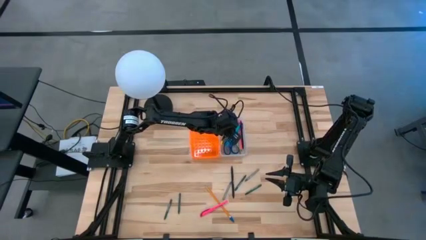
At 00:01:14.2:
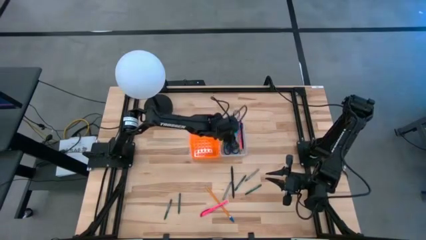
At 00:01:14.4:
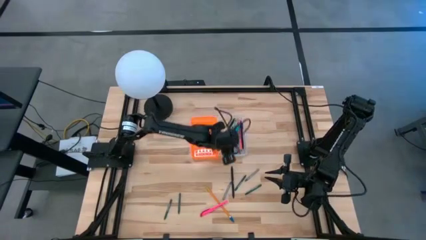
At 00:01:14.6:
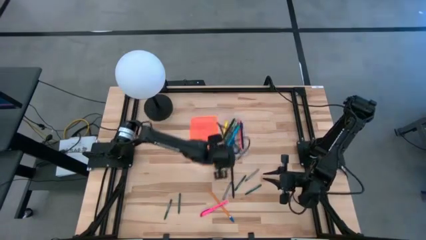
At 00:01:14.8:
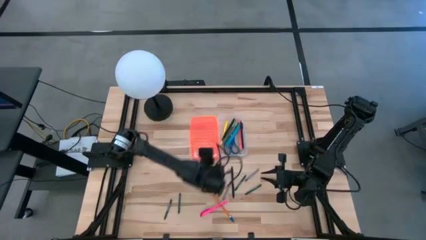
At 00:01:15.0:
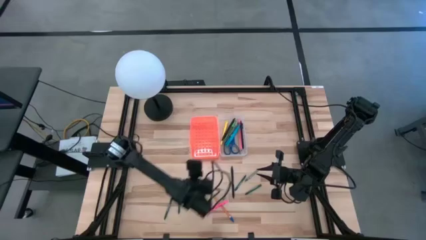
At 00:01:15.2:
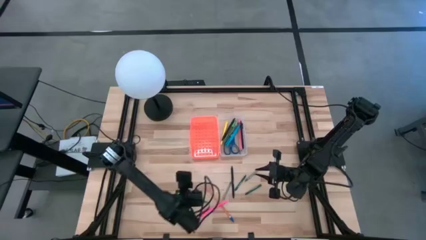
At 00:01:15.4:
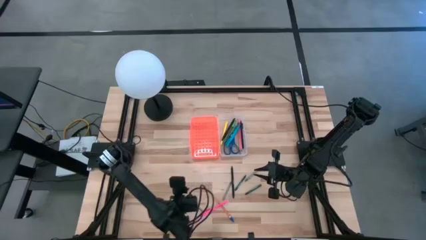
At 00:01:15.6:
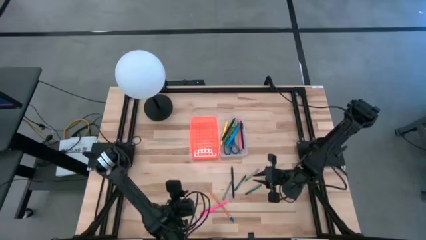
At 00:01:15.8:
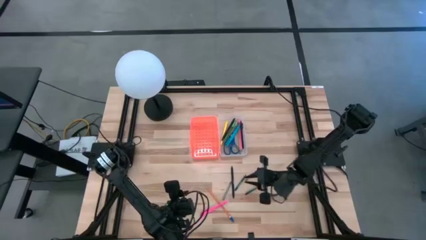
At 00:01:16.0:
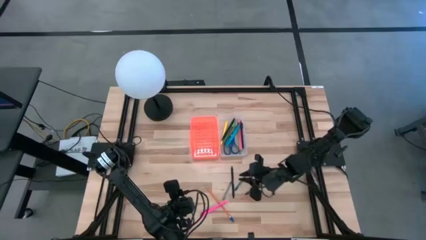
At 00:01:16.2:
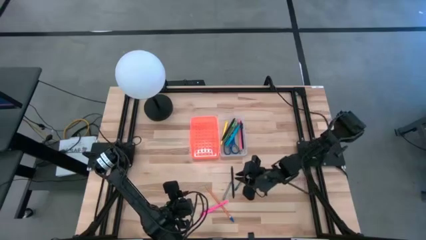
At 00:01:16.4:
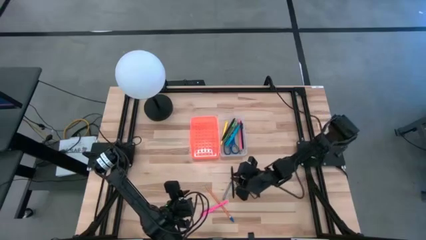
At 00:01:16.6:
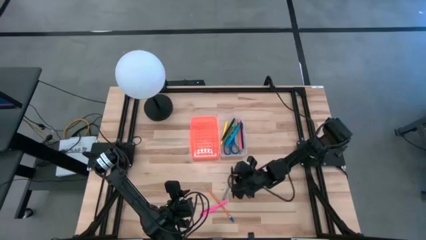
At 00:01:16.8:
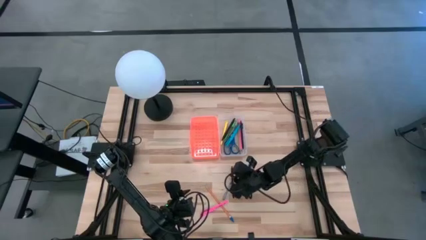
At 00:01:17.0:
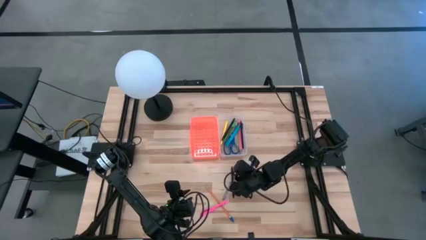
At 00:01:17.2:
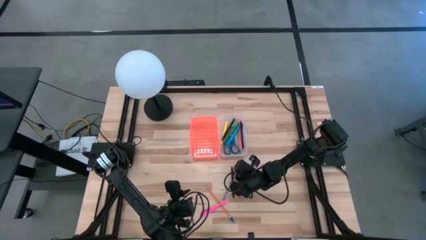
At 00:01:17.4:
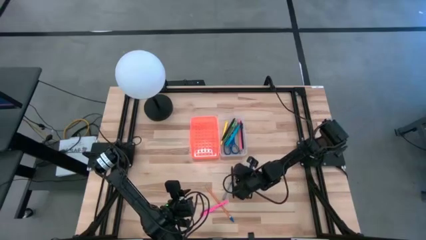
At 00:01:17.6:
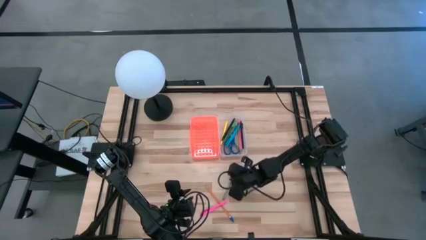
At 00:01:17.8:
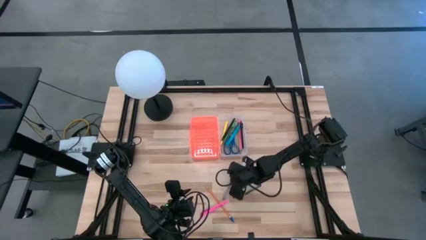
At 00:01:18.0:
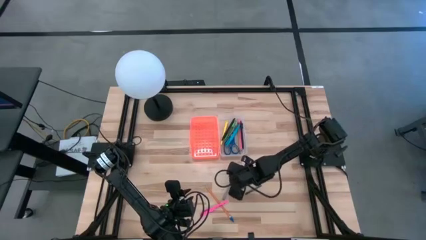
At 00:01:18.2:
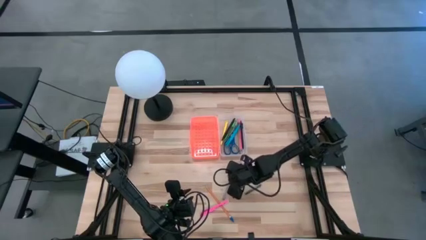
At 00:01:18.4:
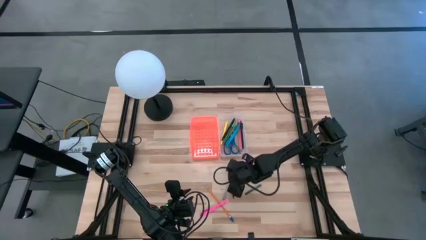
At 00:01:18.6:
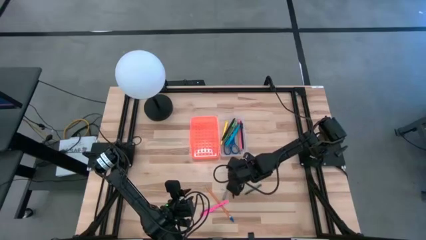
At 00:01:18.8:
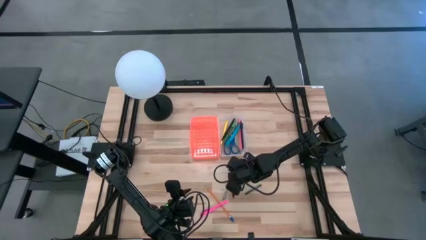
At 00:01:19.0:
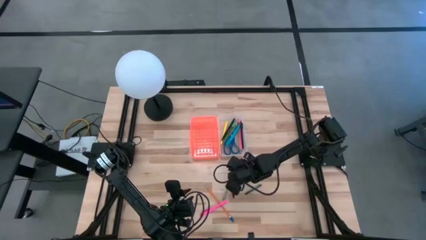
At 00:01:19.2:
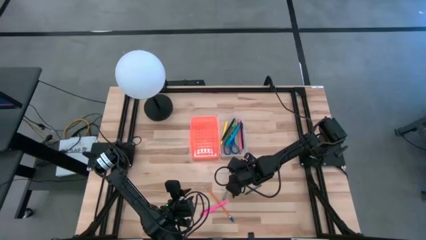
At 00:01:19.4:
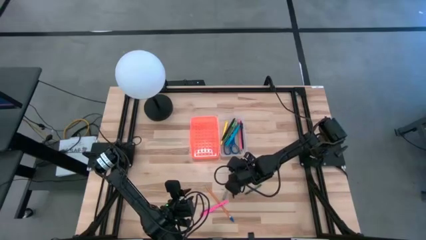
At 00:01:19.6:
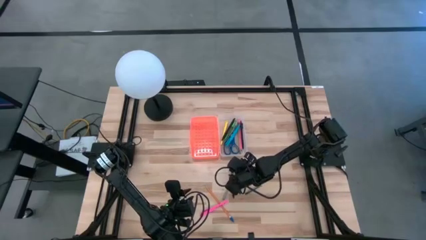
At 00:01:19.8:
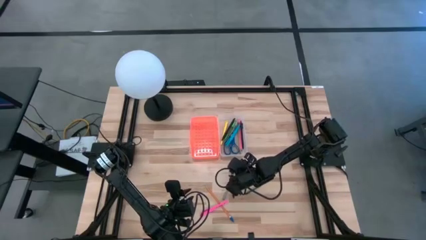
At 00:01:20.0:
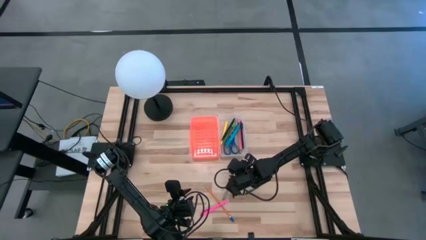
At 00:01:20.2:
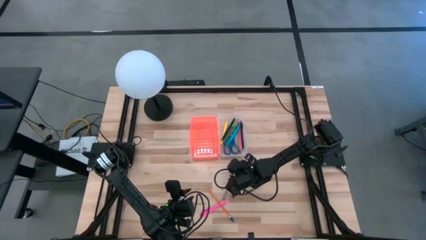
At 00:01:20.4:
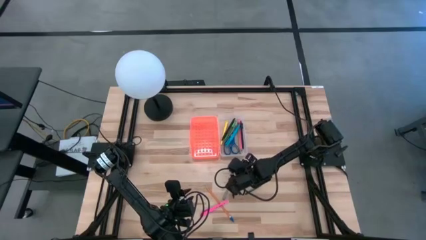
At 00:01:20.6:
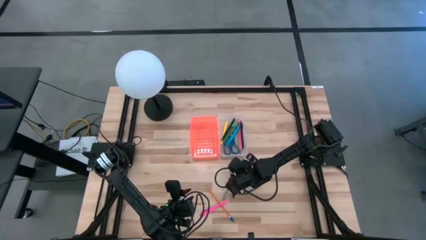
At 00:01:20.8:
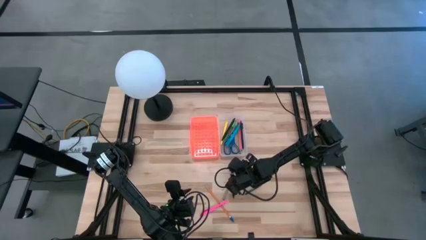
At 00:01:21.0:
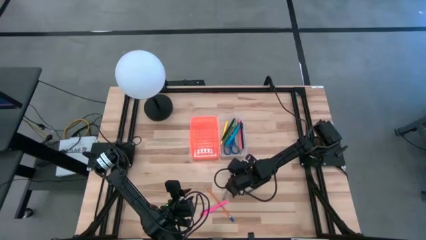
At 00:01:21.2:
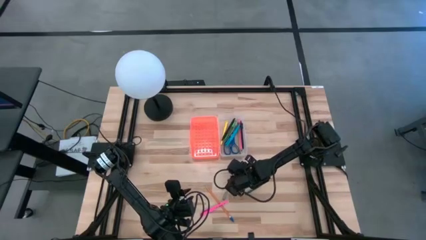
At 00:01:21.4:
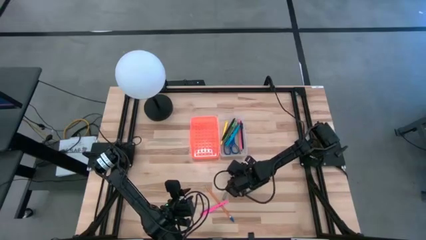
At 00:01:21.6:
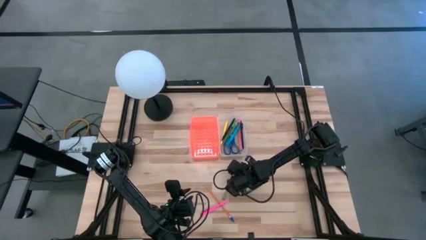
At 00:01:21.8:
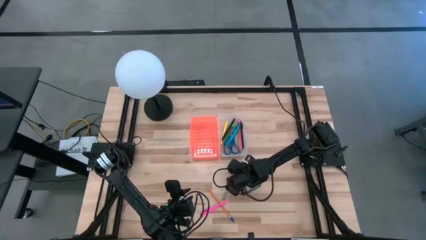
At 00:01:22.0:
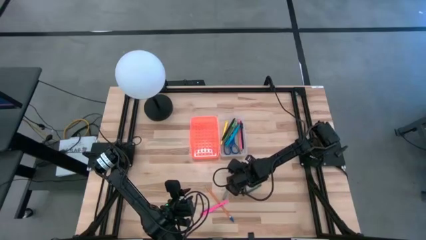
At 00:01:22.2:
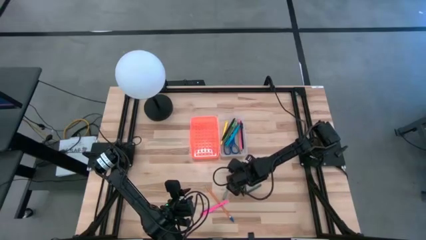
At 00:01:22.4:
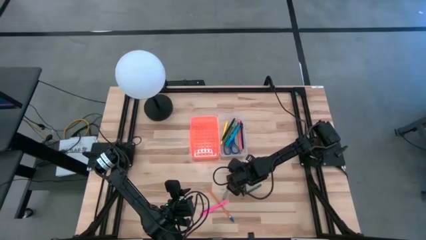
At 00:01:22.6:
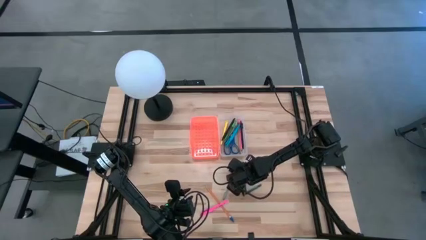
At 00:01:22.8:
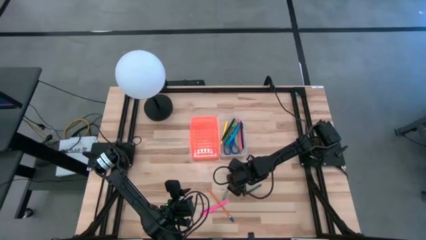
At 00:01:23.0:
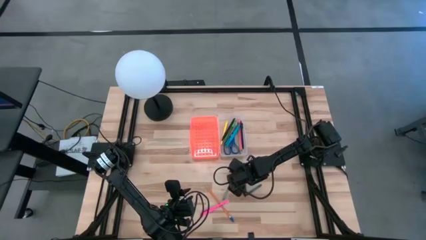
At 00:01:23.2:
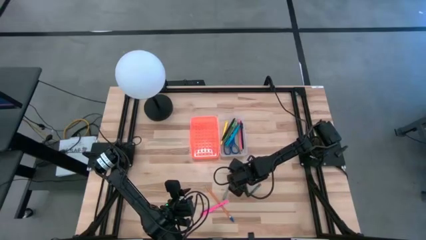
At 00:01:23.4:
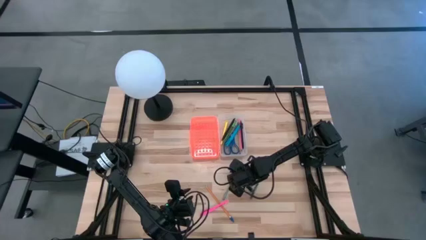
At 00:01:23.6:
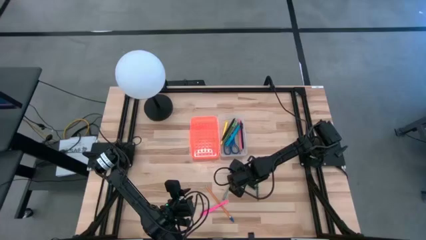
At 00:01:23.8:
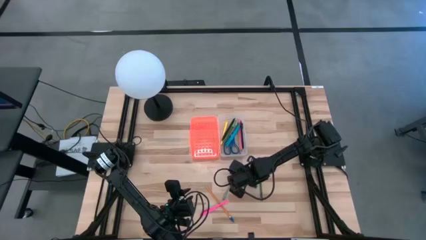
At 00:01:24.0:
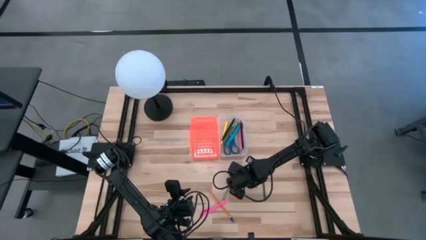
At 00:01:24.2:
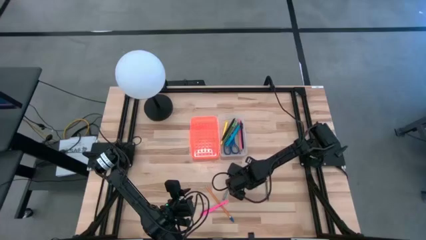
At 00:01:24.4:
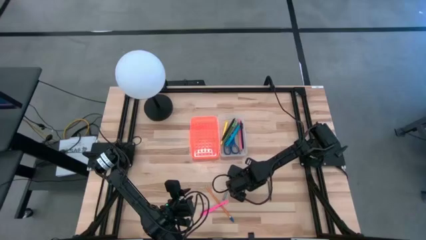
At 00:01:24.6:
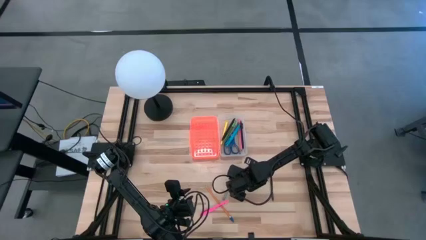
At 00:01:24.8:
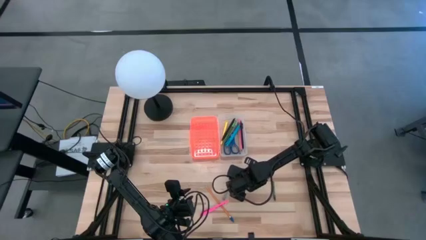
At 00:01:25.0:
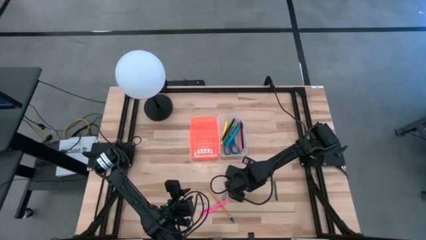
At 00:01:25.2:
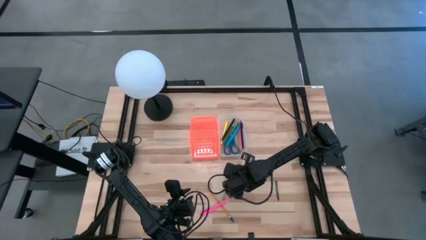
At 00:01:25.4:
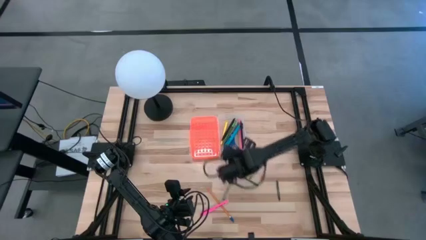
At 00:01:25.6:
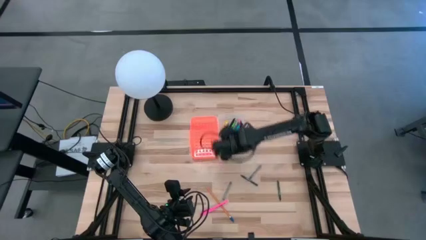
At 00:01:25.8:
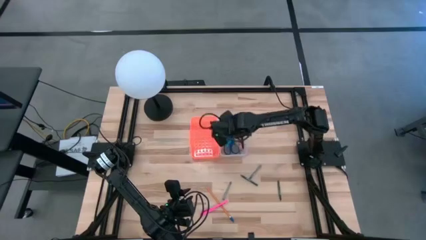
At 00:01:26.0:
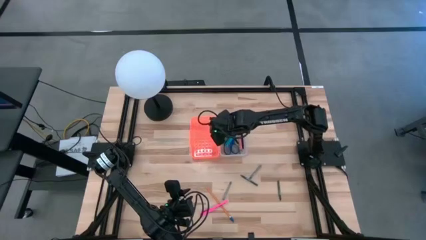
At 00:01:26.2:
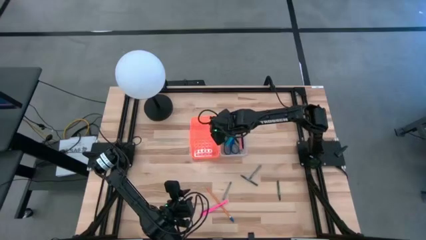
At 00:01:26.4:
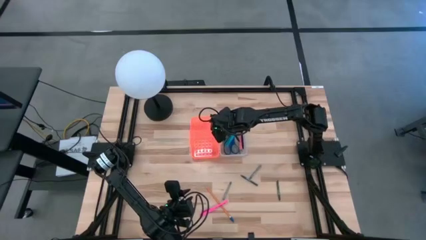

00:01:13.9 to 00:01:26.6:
Task: Pick & place school supplies into a supply box
Put the black pen into the orange supply box

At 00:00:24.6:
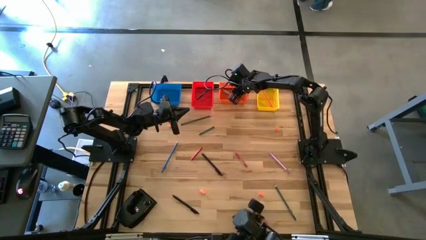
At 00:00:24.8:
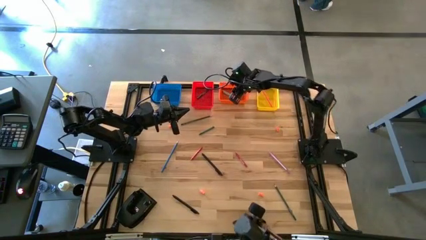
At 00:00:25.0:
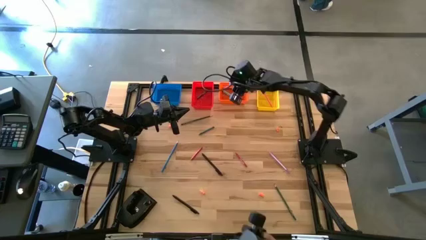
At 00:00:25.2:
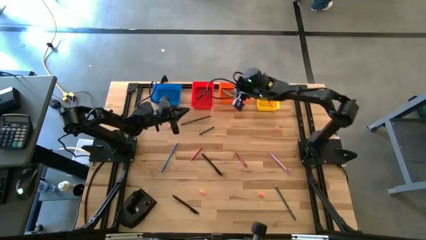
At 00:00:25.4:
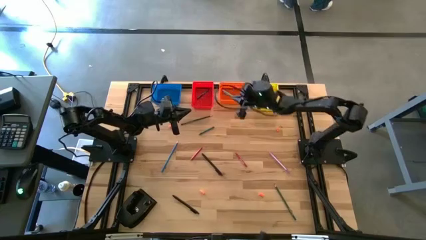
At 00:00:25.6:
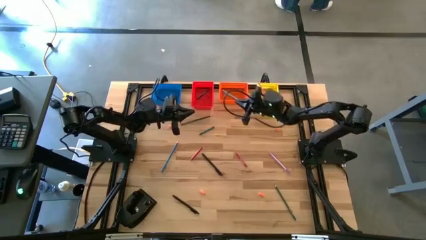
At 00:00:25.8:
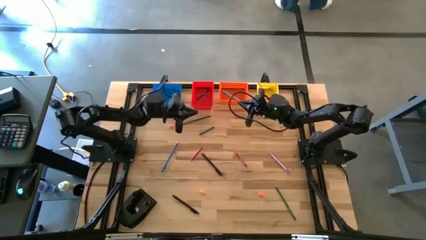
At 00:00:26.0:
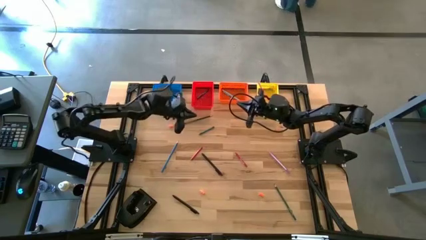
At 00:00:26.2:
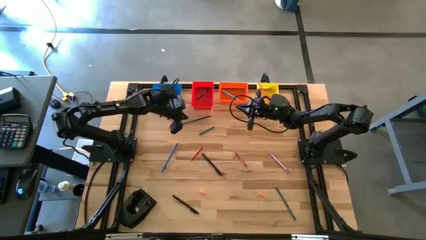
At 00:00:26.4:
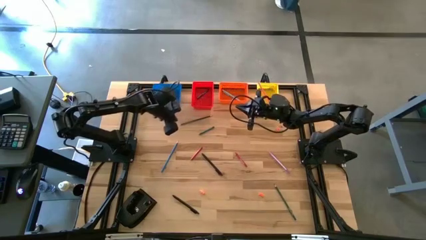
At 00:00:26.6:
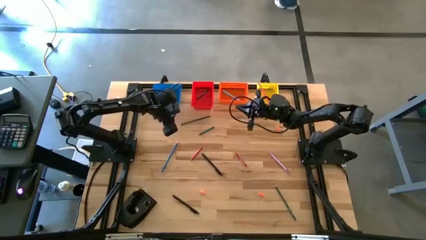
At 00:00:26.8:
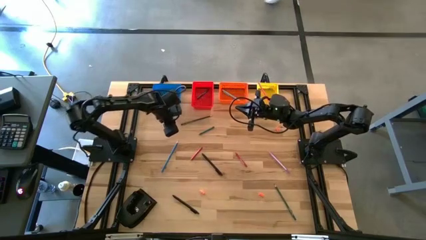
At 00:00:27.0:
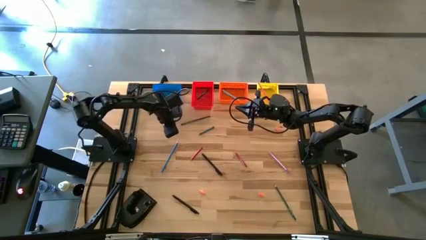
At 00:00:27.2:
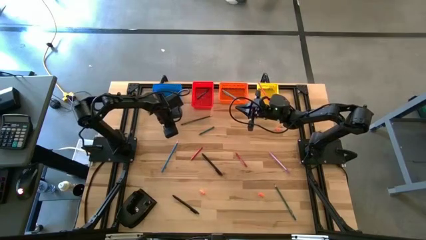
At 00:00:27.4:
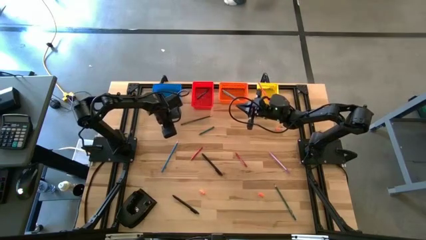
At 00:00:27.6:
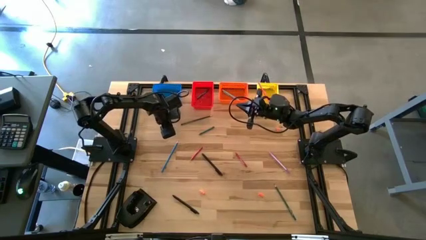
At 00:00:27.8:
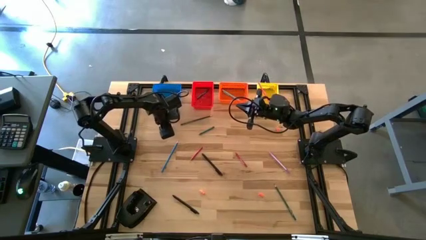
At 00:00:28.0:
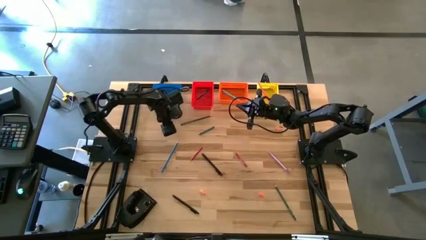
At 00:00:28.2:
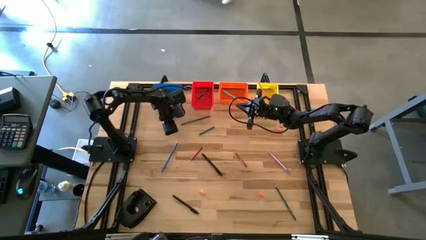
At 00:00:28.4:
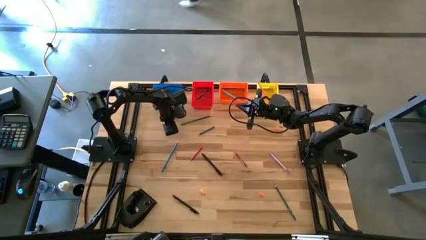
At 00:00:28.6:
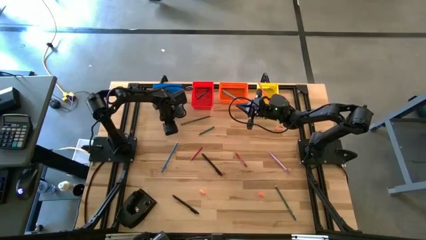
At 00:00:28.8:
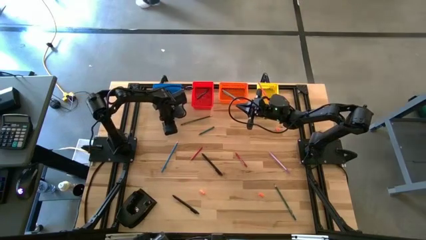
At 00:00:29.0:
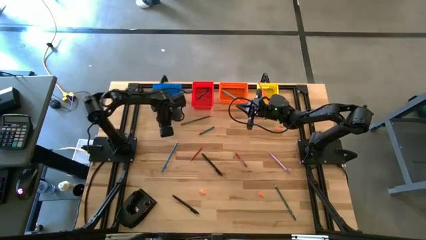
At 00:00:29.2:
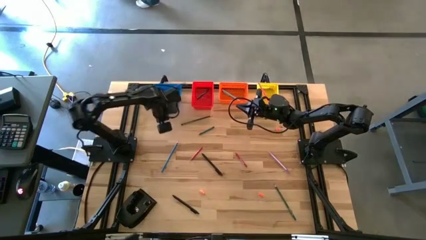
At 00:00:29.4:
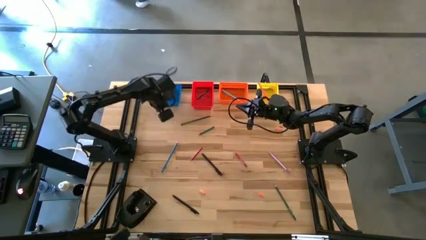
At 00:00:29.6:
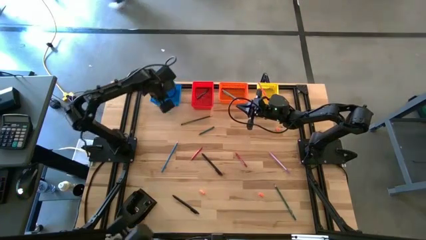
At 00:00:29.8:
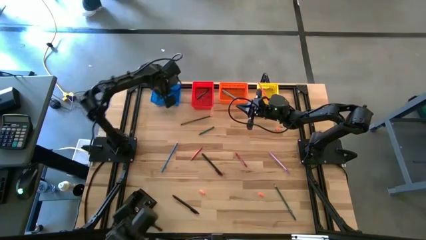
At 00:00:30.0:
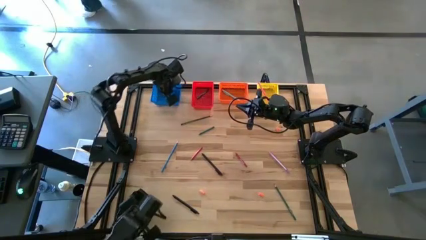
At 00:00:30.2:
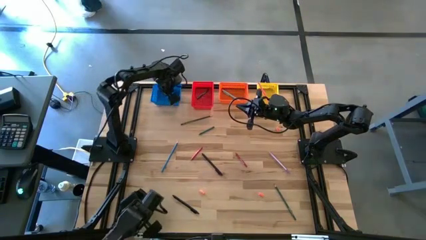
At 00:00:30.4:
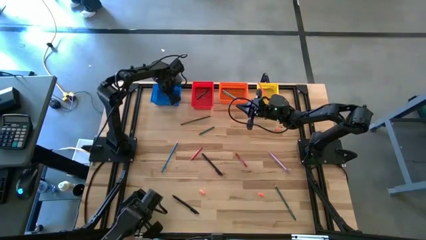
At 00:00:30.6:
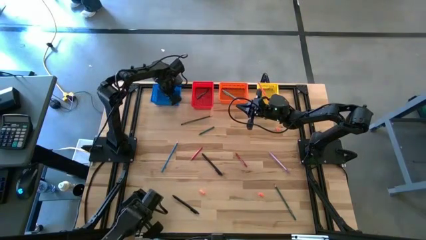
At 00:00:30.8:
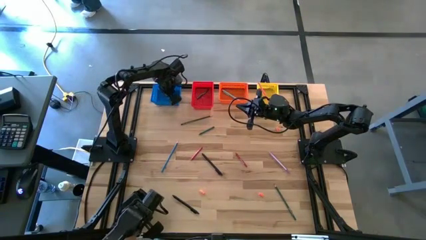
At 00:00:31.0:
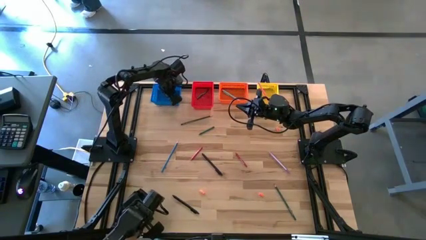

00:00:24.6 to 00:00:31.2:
Task: Sort crayons/erasers/pens/pencils in bins
Put the orange eraser into the blue bin
